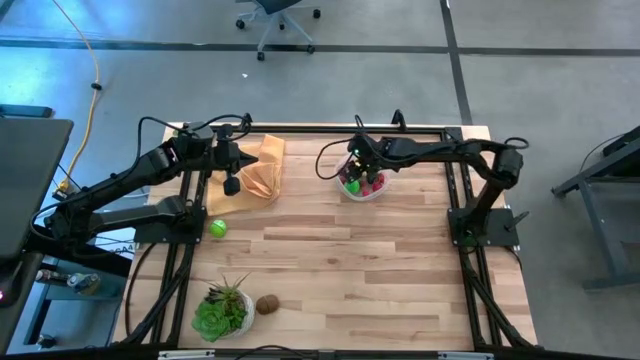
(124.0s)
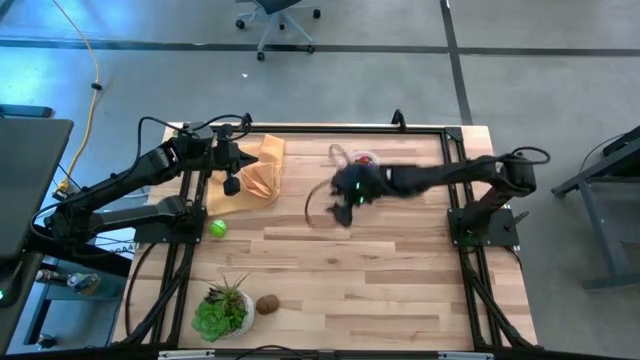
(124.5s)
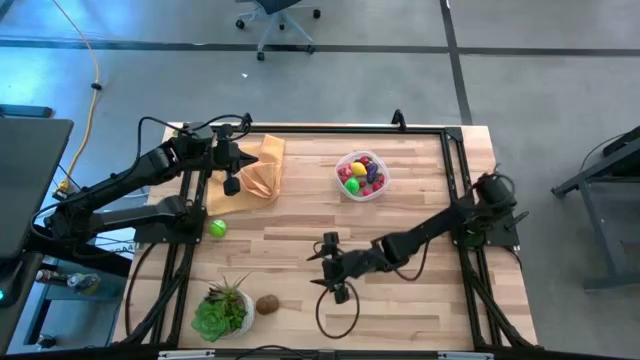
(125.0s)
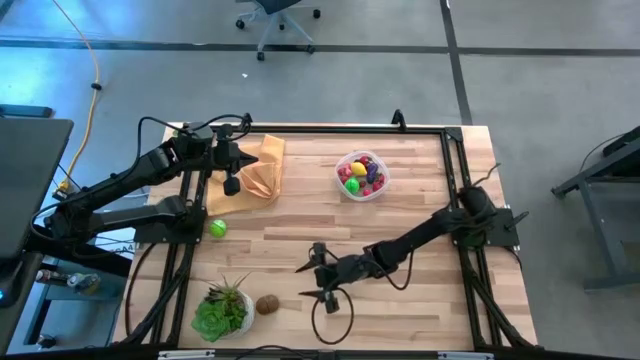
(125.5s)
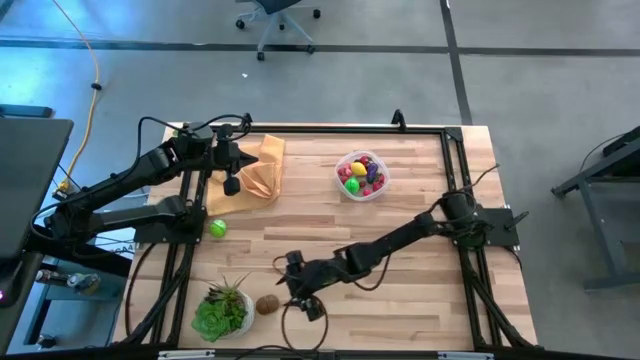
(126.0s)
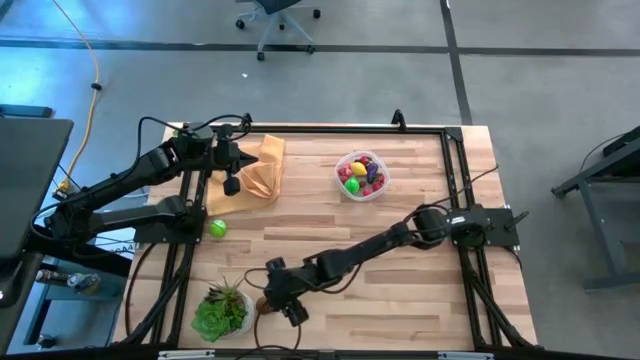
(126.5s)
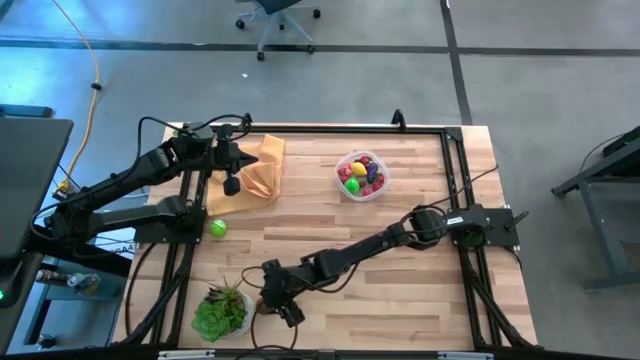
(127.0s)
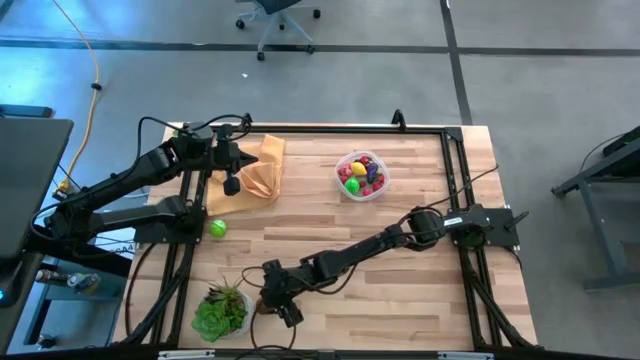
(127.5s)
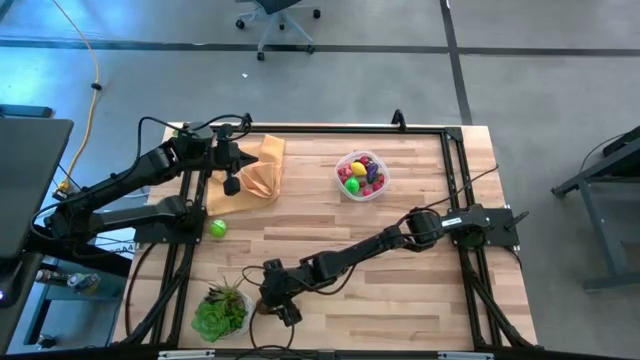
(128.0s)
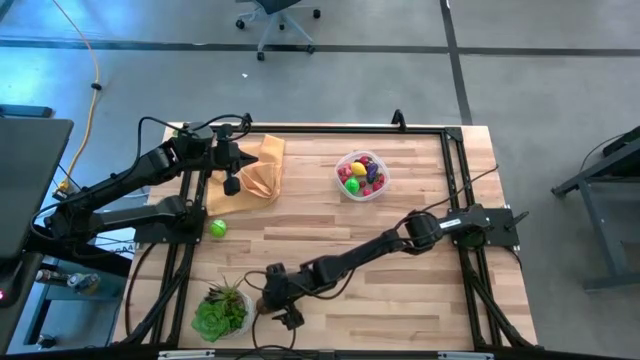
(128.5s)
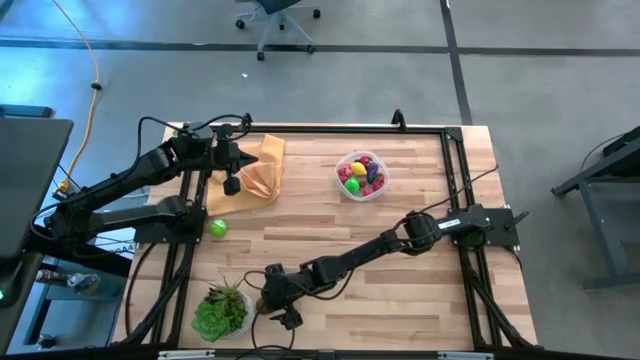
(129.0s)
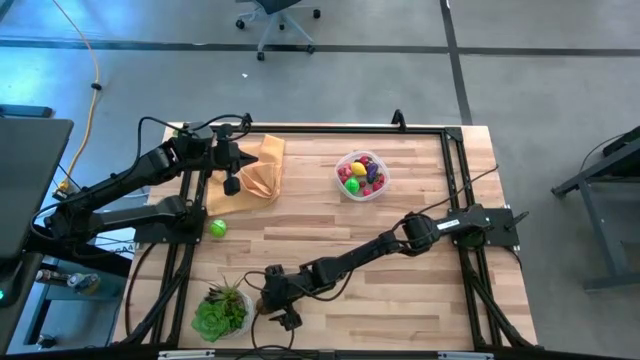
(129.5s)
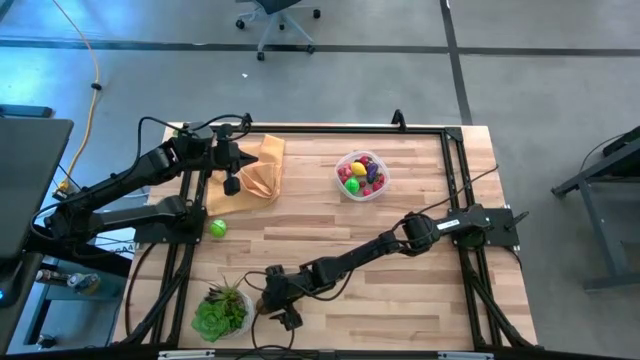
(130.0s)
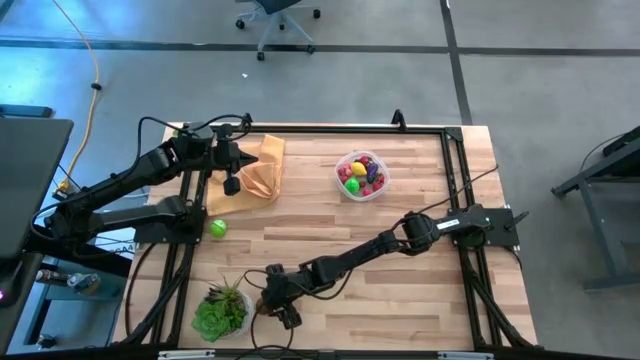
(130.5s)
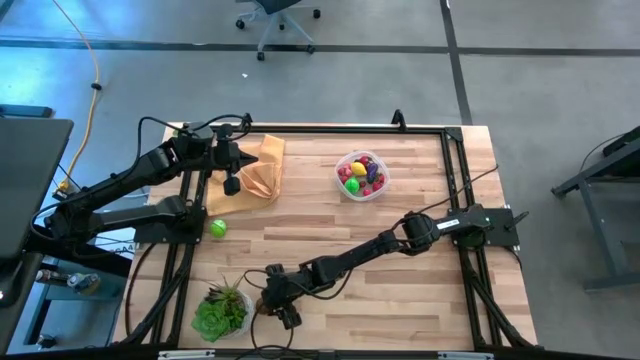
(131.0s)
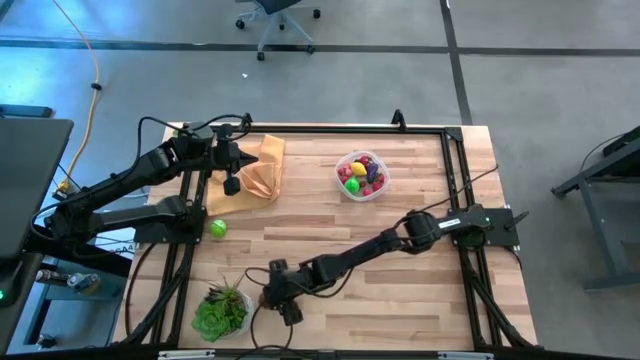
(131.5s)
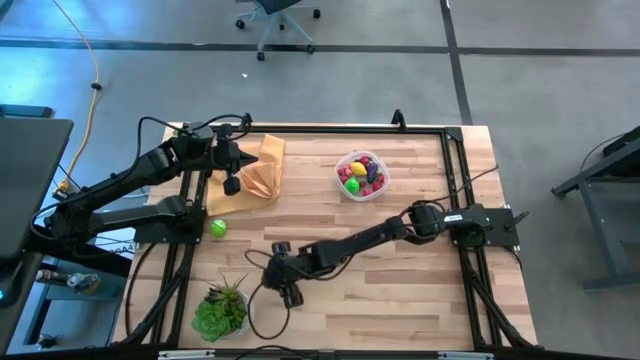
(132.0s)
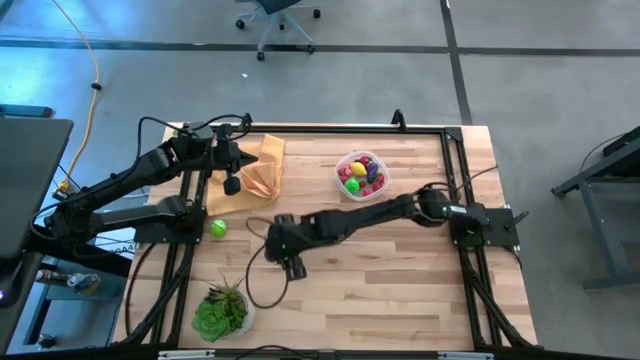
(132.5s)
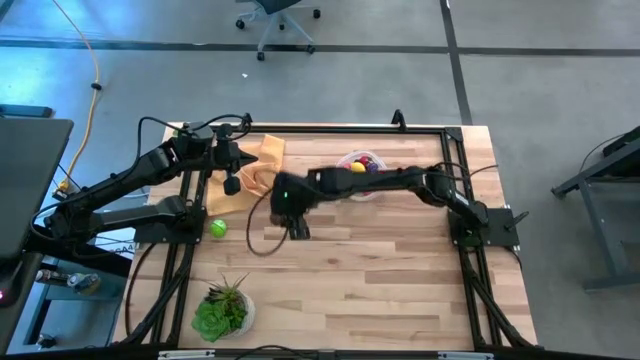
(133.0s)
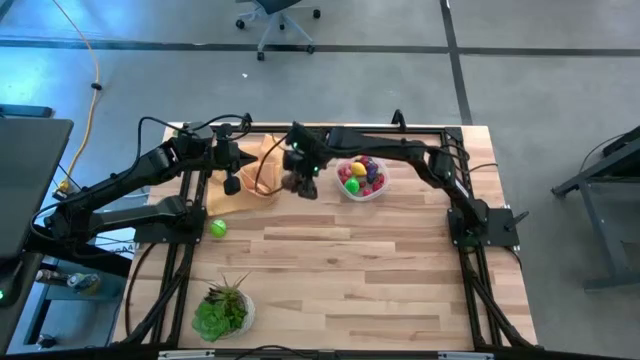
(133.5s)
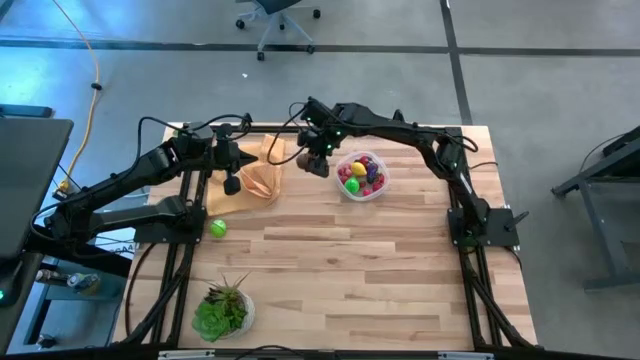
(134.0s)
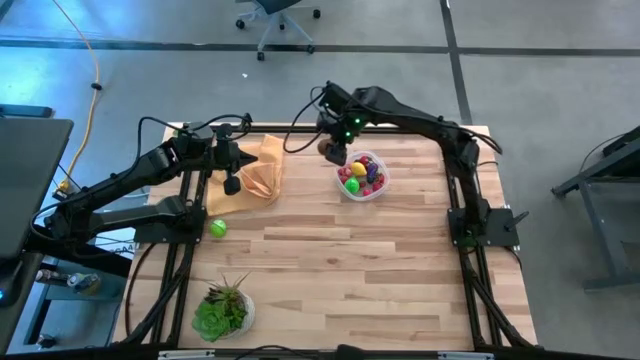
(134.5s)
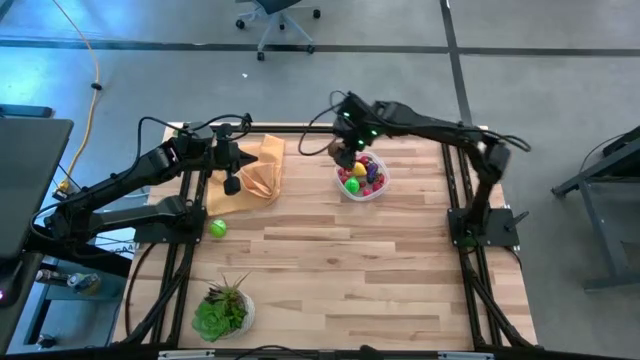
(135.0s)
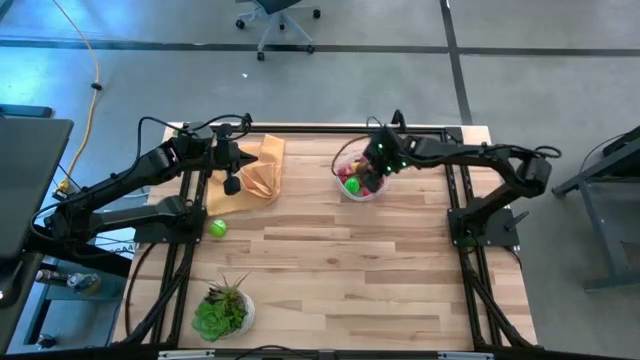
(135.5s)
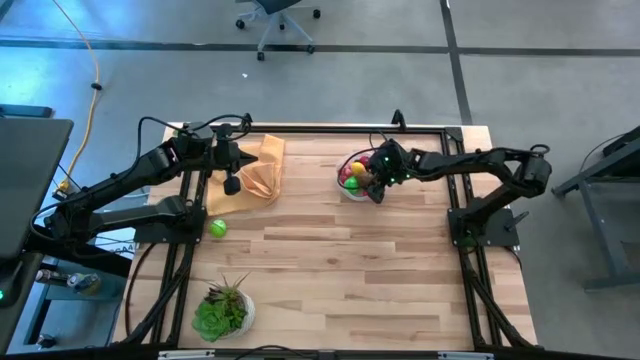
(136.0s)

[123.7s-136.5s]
Task: Pick and placing Produce into tupperware
Put the brown kiwi into the transparent container

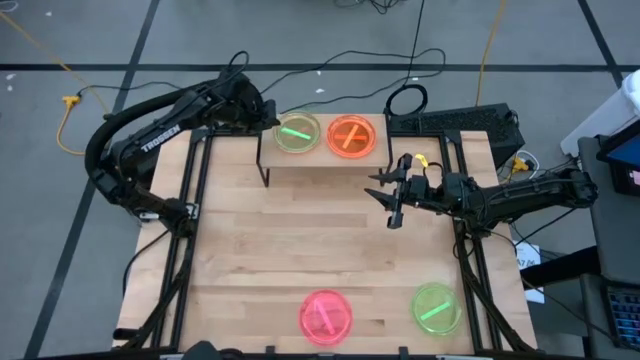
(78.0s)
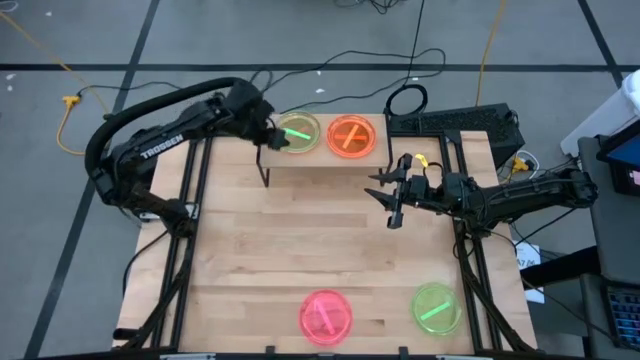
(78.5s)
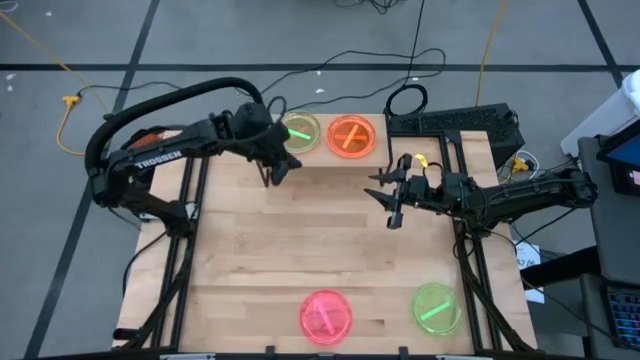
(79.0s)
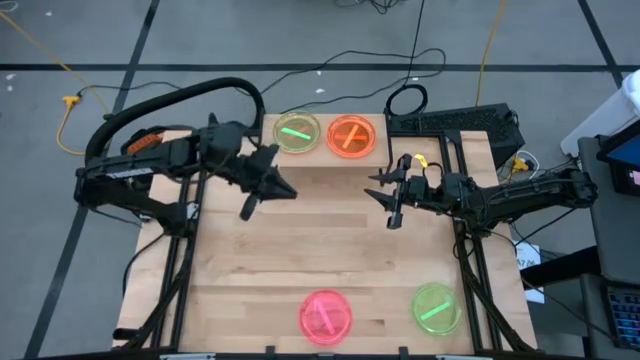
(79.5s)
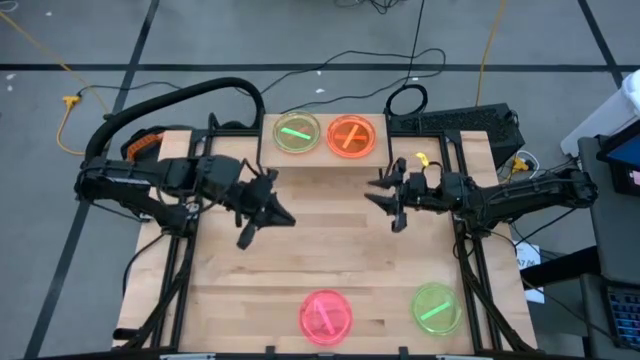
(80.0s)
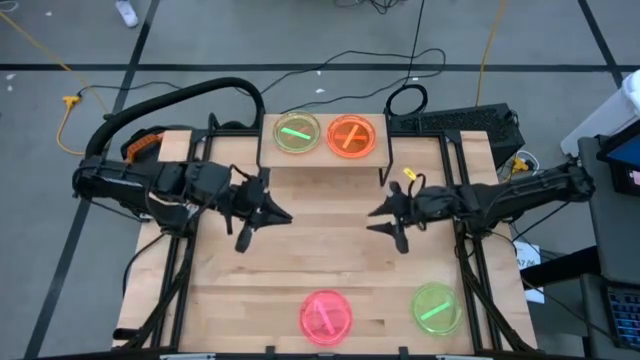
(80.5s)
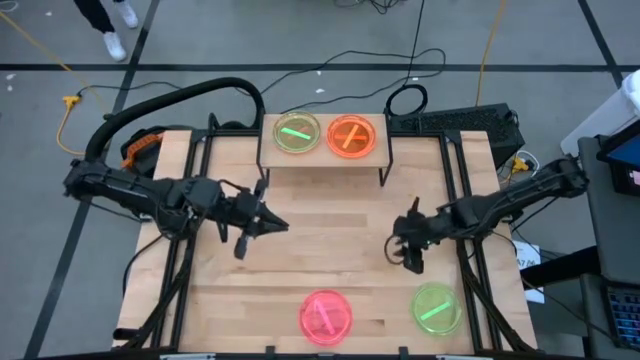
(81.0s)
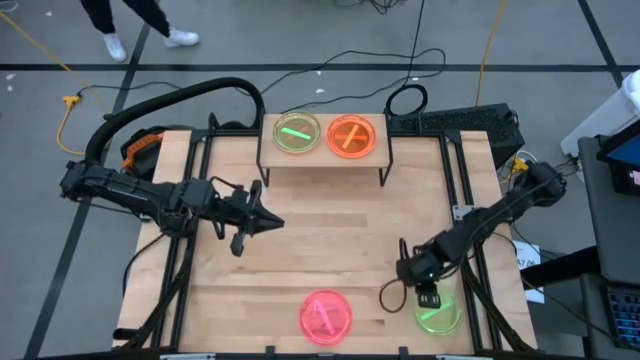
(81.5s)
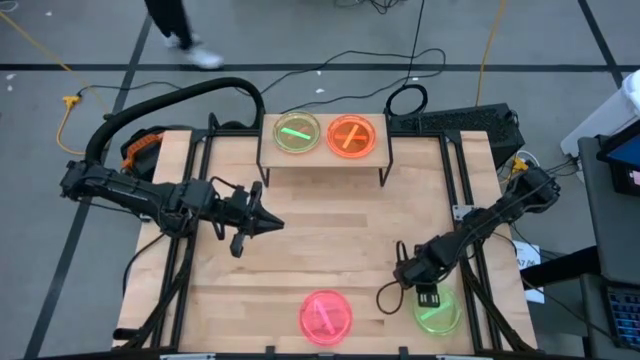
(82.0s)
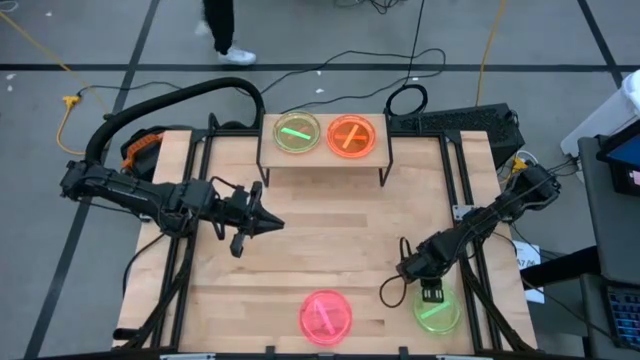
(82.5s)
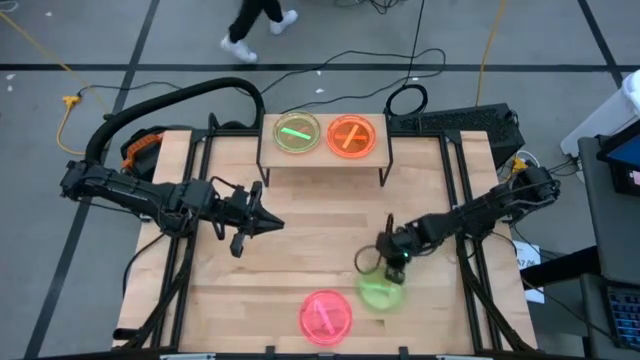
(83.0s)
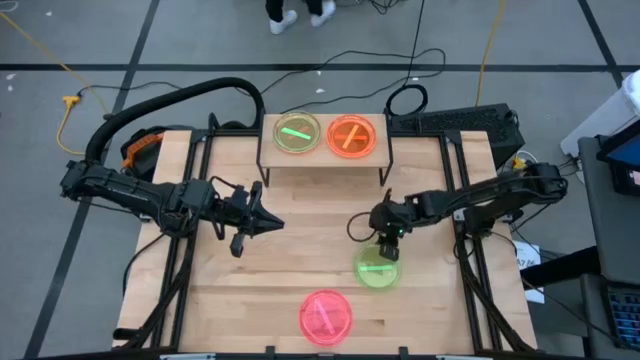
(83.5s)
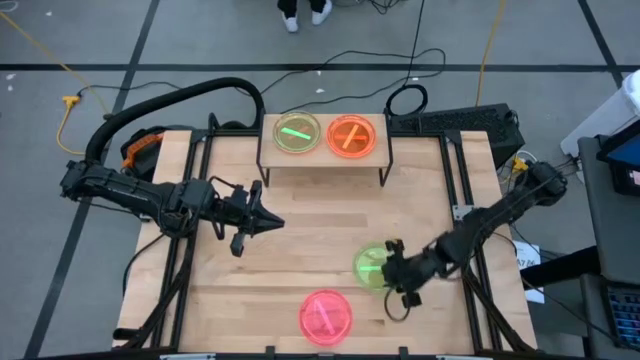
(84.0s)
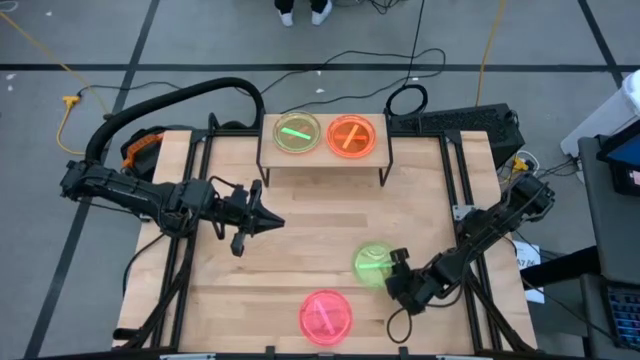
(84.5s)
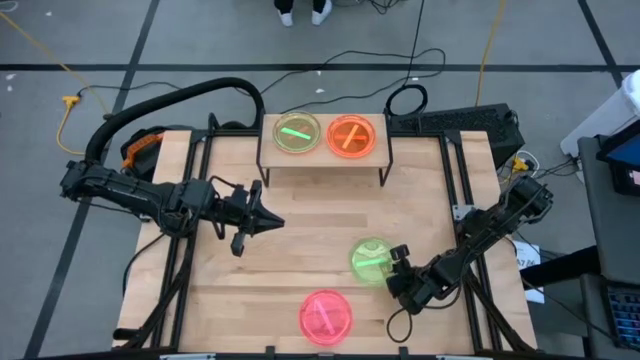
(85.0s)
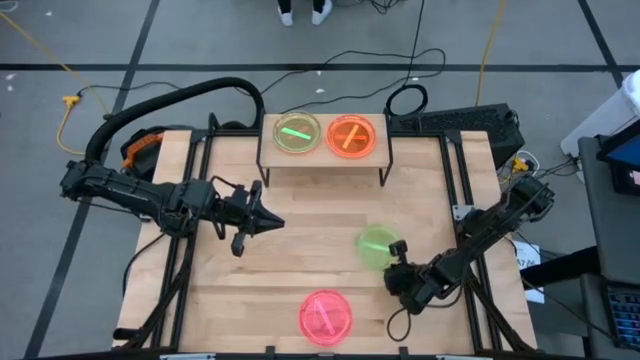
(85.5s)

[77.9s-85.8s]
Task: Place and stack plates onto a shelf
Stack the green plate on top of the orange plate on the shelf
